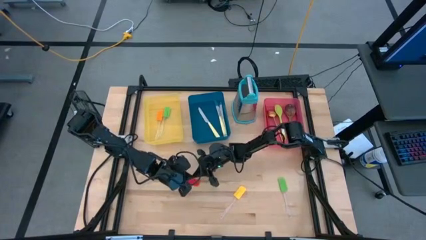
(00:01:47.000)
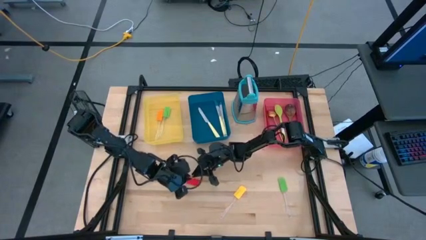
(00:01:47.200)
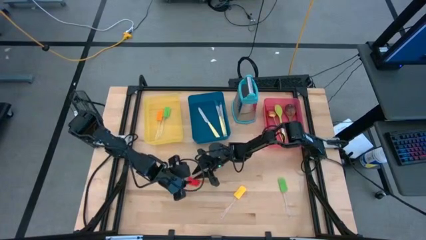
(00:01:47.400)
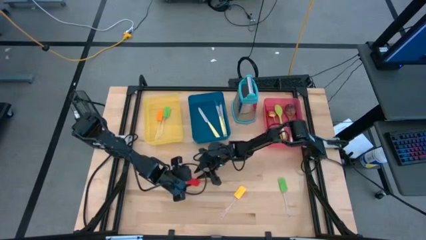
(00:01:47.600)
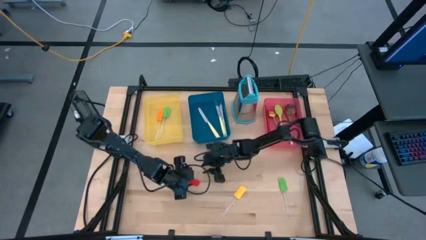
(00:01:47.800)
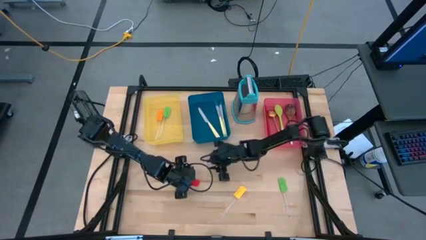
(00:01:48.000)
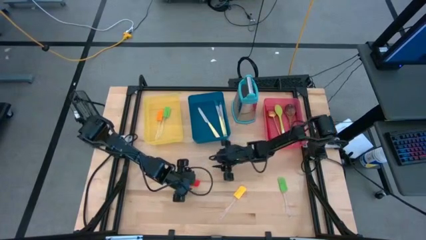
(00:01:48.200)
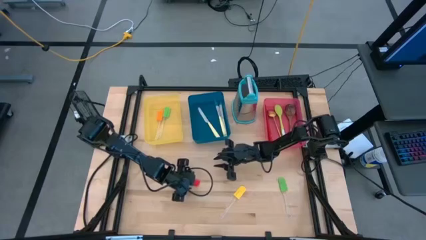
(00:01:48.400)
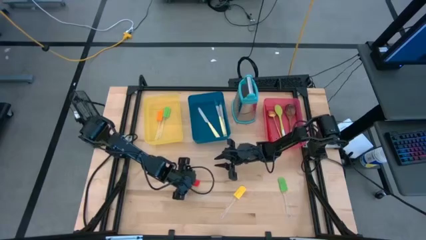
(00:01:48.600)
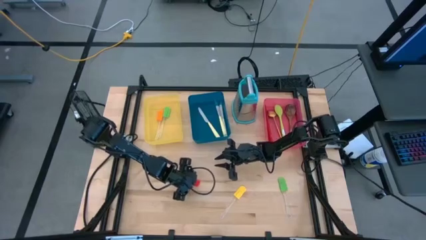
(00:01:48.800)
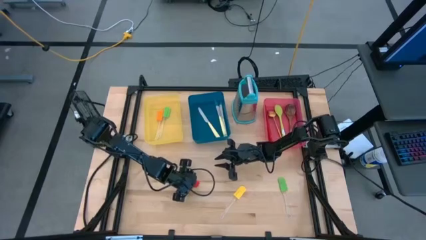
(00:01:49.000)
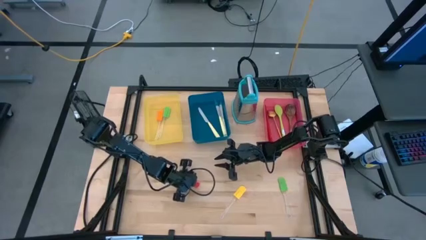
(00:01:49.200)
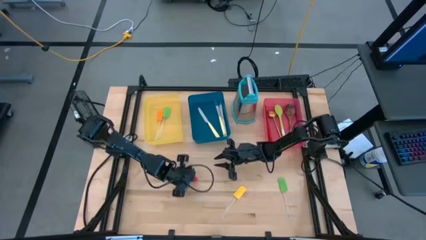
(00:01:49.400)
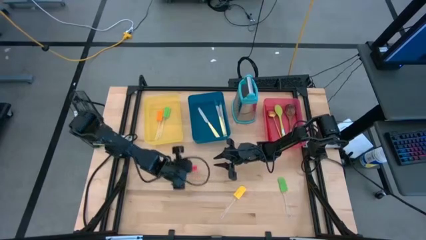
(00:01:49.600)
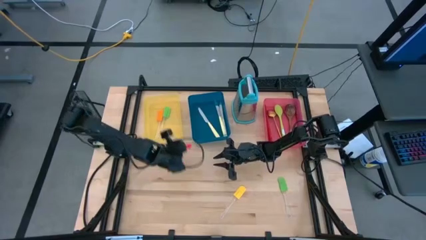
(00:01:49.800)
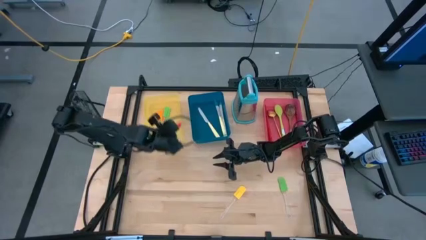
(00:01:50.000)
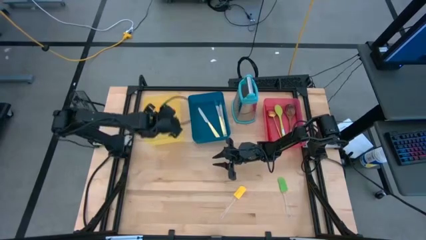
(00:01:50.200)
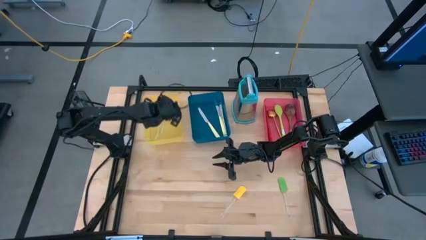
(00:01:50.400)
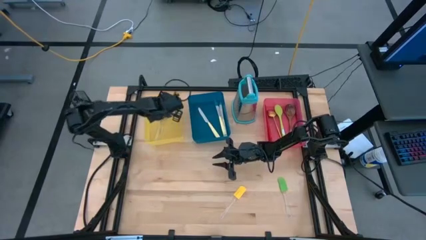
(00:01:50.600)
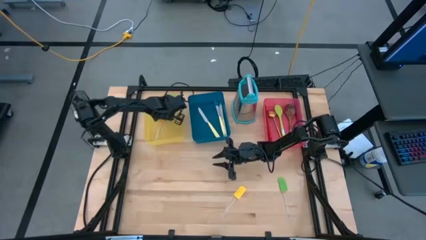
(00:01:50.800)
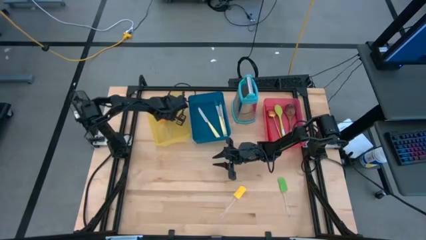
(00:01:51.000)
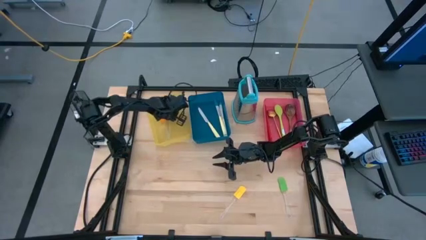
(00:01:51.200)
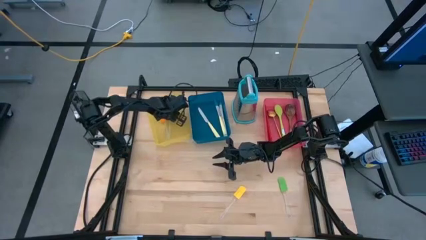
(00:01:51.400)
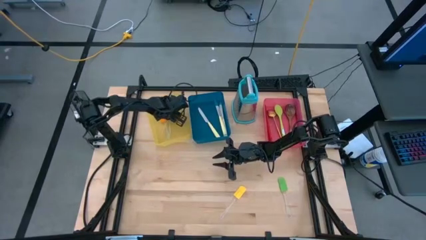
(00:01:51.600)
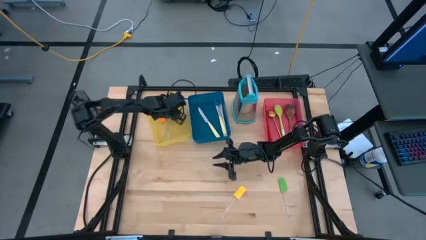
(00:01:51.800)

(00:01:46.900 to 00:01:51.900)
Task: Pick & Place Kitchen Items
Put the red spatula into the yellow bin

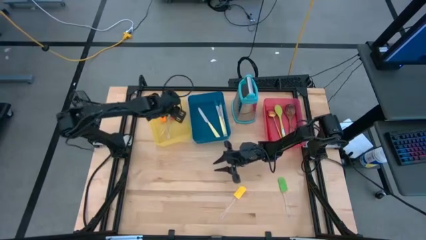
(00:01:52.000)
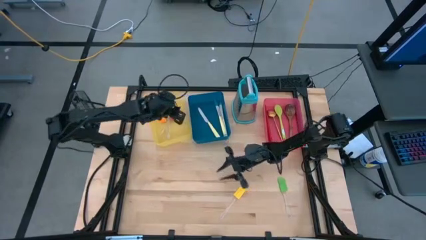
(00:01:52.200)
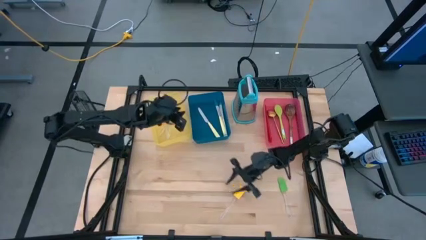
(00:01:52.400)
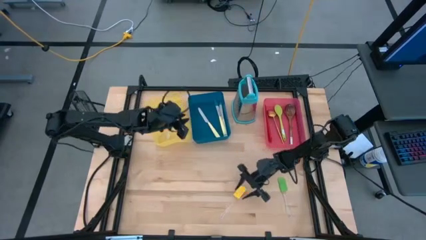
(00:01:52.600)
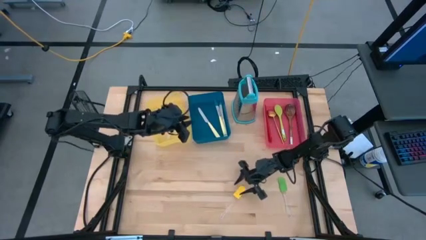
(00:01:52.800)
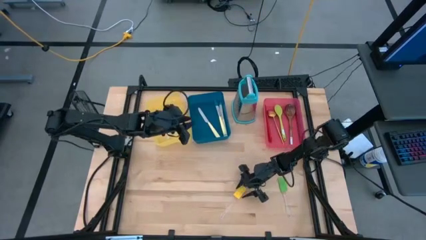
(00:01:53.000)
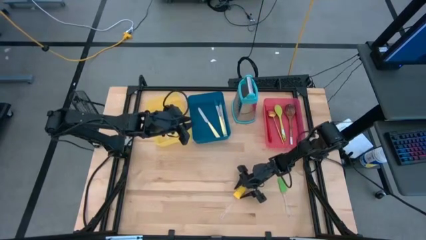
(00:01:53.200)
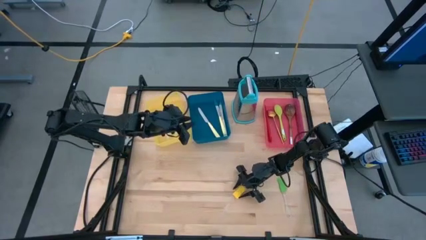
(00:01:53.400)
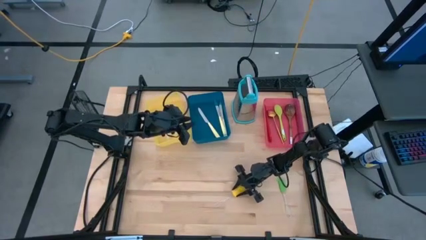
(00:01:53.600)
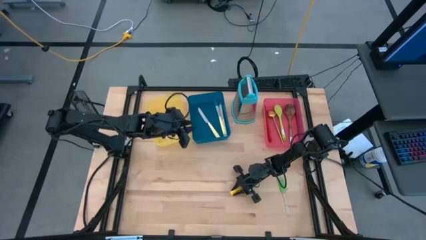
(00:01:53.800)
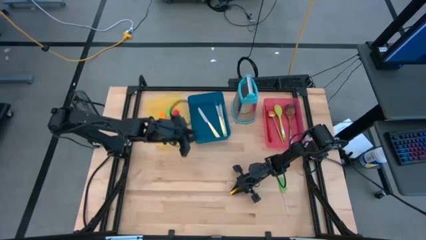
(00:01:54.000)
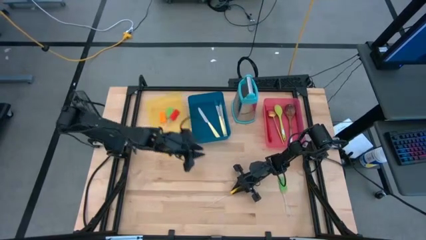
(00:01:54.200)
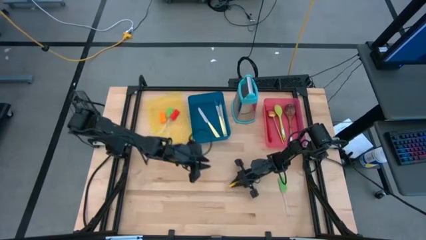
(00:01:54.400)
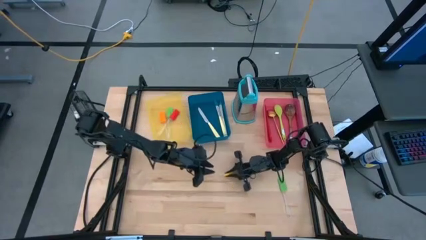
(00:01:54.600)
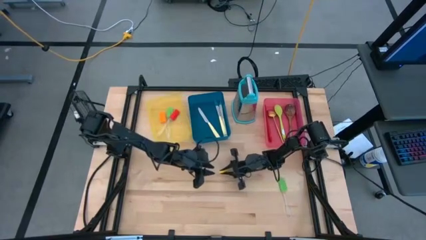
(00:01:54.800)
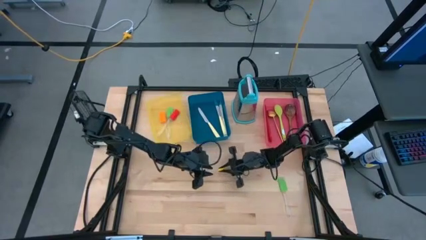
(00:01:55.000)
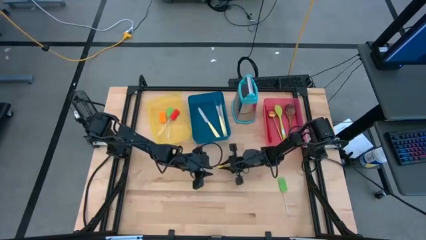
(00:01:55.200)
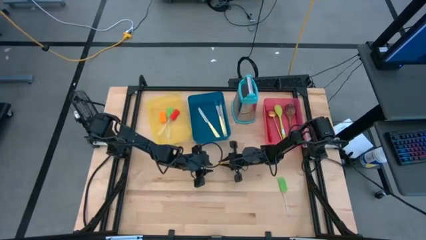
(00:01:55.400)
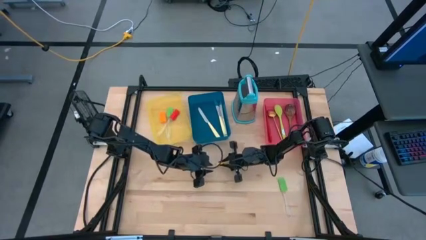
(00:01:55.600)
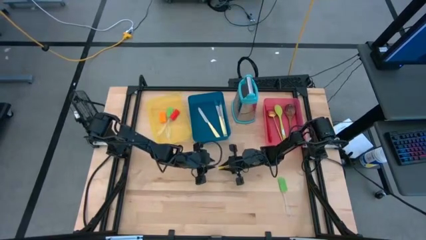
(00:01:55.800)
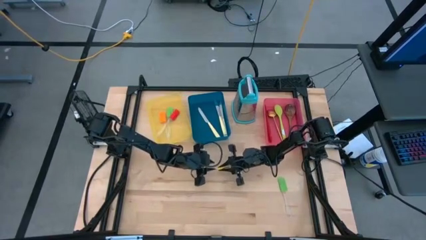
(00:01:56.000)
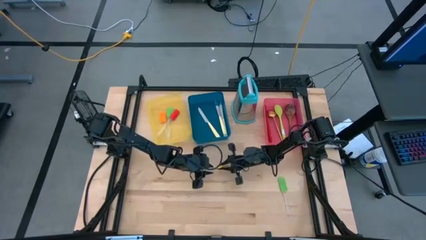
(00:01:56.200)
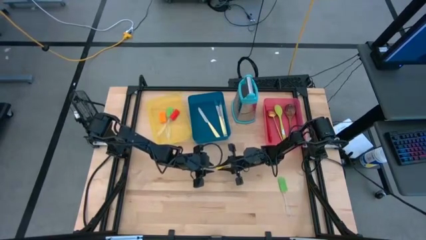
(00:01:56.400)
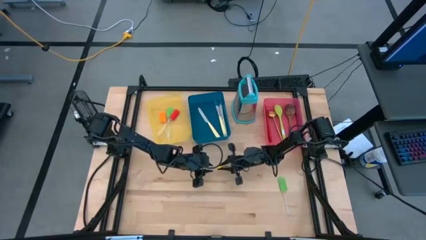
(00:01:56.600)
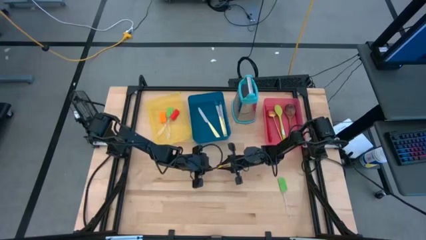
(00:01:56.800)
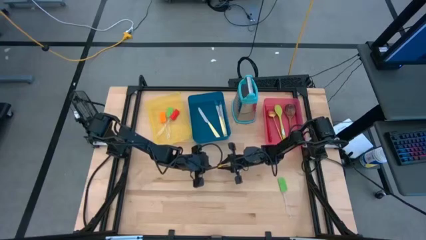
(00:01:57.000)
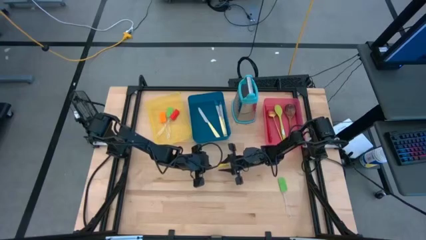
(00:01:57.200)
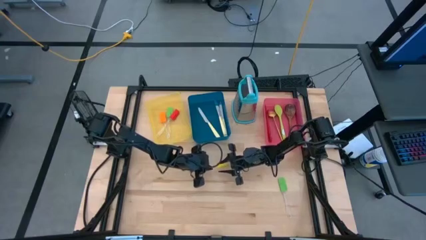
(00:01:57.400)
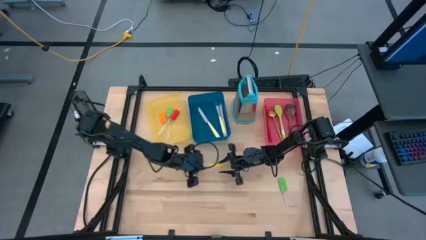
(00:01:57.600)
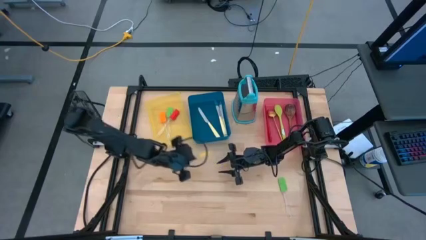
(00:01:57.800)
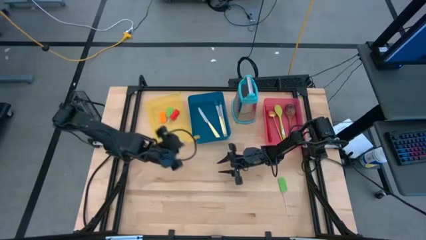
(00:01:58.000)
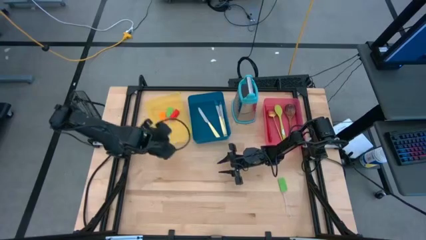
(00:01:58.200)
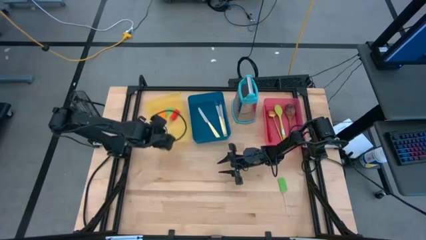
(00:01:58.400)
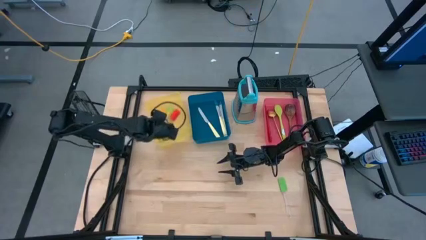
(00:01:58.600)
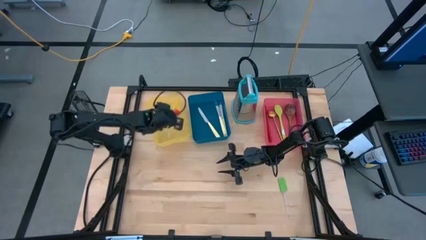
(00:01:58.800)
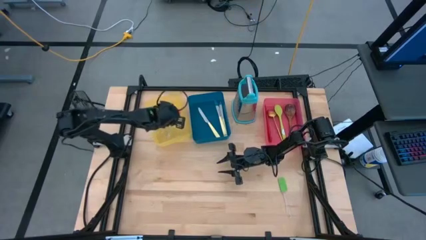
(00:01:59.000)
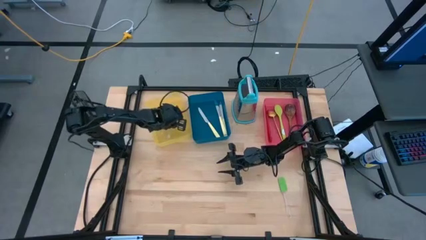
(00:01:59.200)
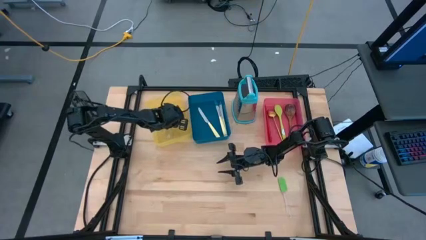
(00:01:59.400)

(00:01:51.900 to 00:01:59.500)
Put the yellow spatula into the yellow bin

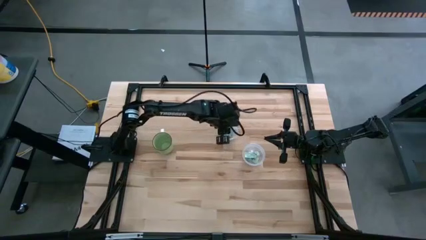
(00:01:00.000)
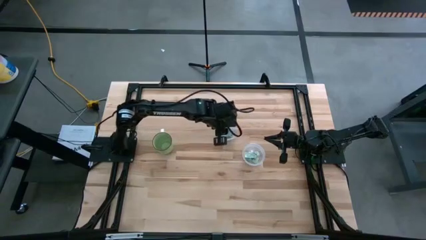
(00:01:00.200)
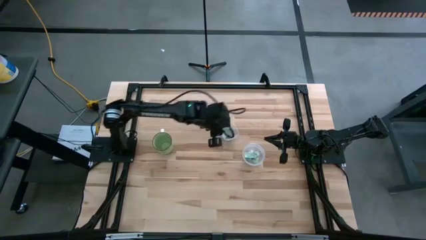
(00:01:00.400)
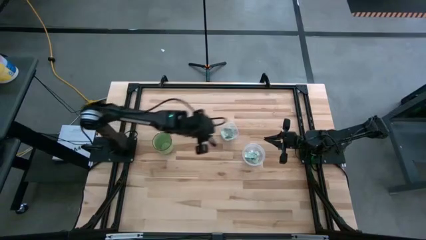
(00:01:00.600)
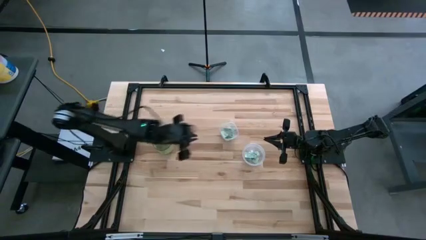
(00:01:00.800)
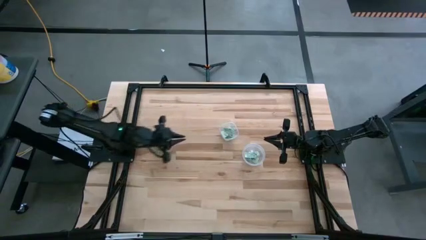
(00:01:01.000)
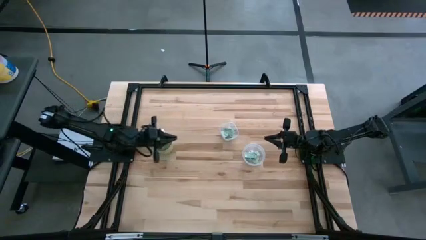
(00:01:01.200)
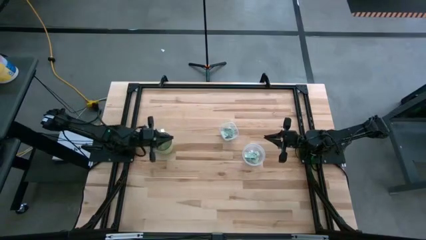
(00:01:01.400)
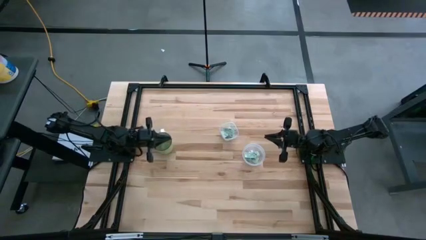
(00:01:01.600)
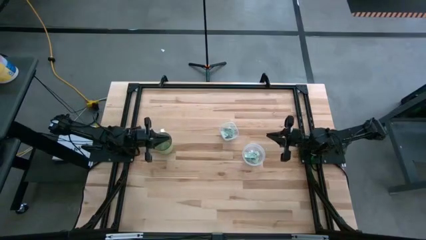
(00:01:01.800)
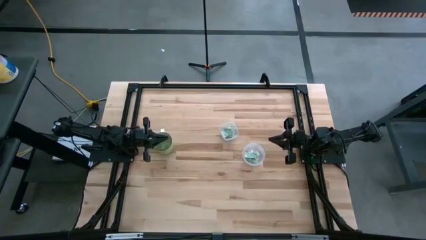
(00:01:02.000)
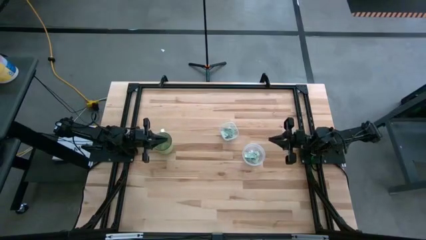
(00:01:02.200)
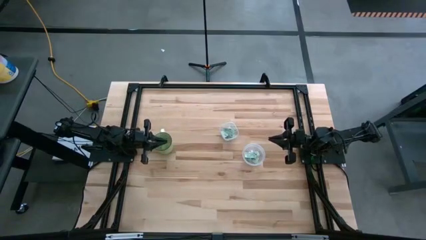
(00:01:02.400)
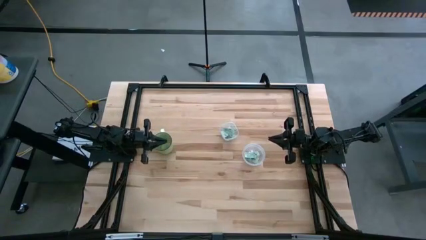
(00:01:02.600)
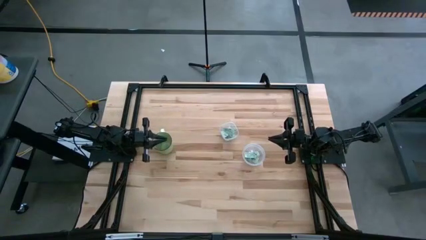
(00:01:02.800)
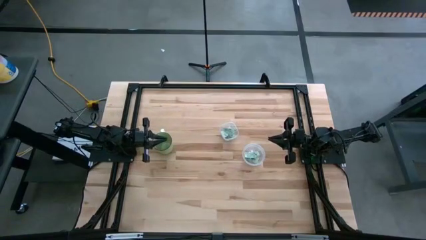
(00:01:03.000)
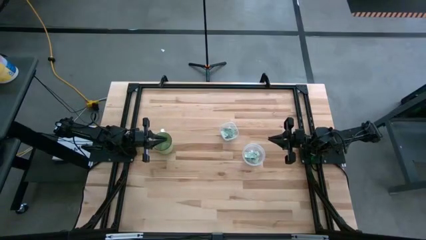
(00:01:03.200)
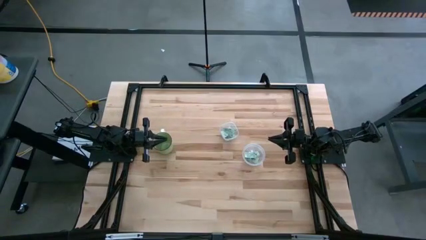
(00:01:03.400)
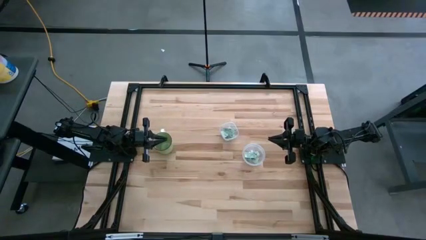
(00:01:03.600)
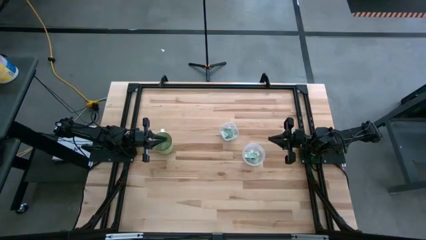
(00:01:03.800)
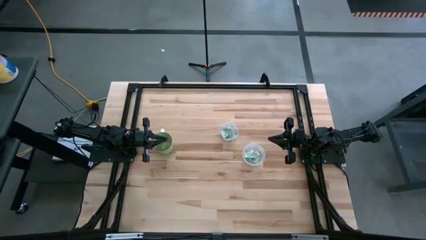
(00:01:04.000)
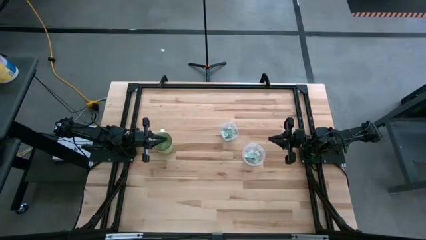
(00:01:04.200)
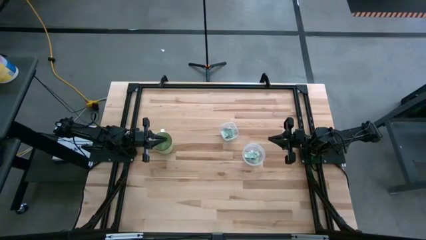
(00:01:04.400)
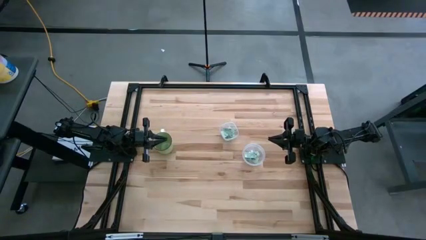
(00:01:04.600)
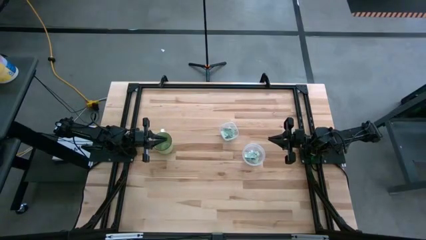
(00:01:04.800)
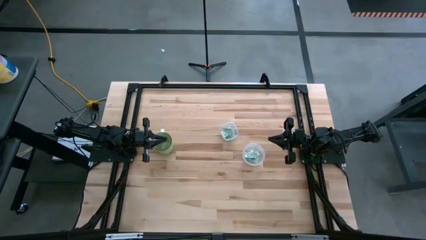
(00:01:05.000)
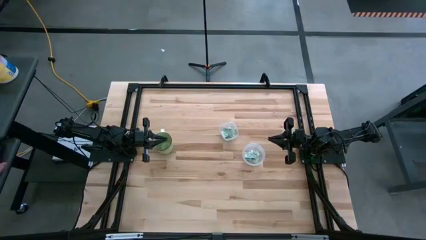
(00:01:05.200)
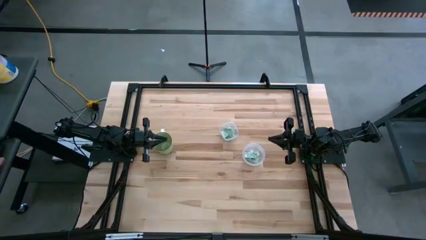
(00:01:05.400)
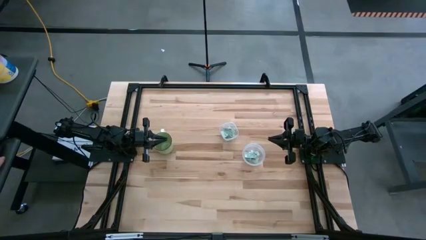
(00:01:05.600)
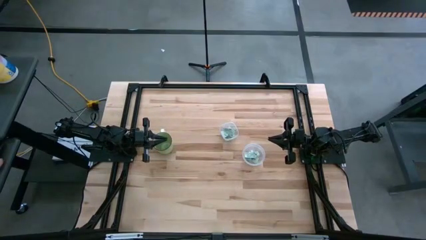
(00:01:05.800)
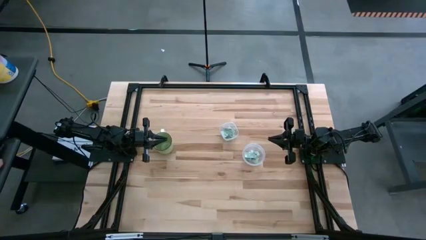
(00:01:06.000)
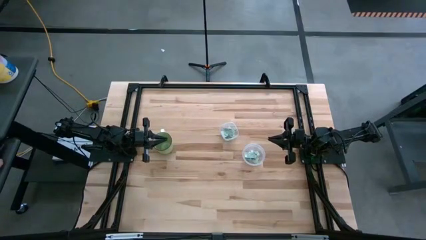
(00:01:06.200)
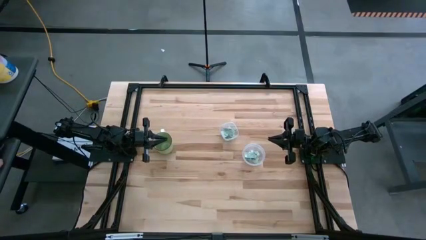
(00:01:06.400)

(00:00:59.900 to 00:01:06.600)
Task: Pick and place Stevia / Truvia into bins
Return to Home Position
